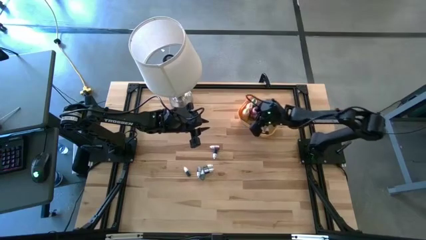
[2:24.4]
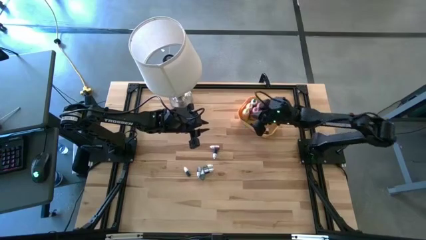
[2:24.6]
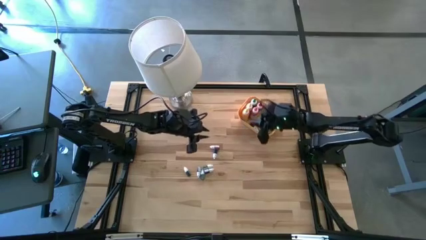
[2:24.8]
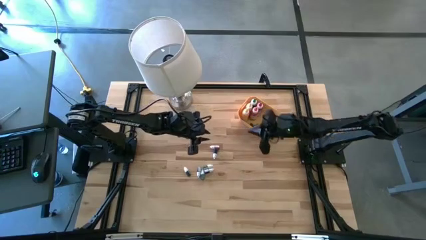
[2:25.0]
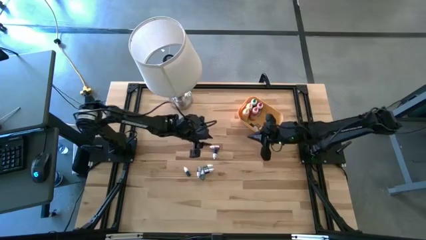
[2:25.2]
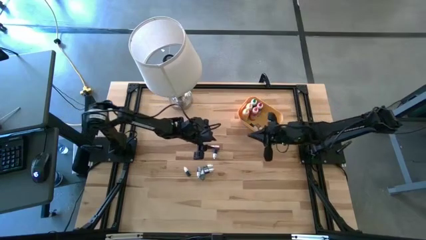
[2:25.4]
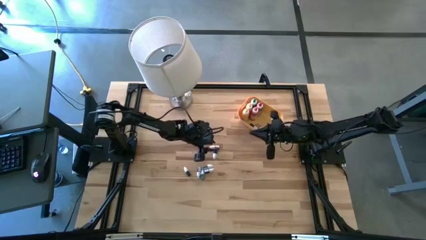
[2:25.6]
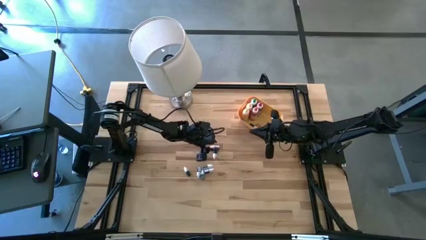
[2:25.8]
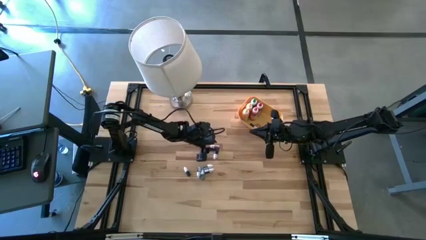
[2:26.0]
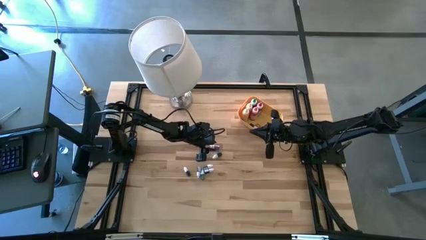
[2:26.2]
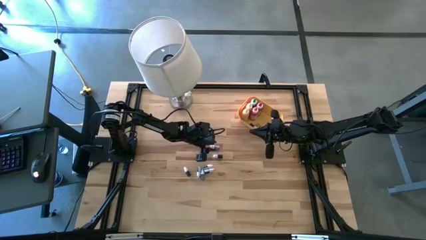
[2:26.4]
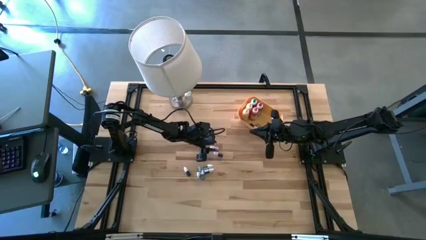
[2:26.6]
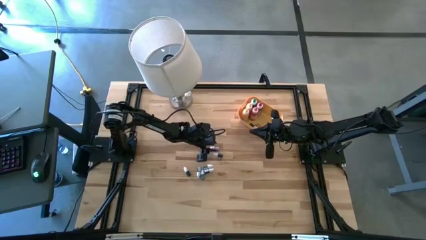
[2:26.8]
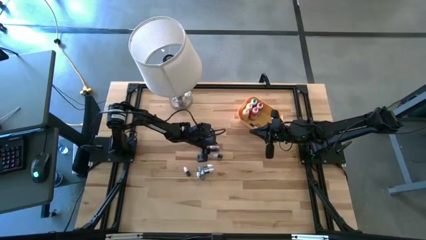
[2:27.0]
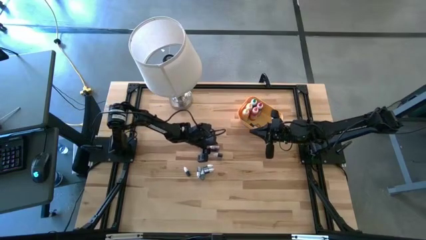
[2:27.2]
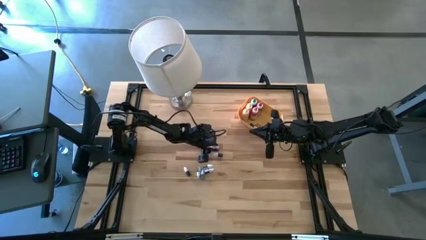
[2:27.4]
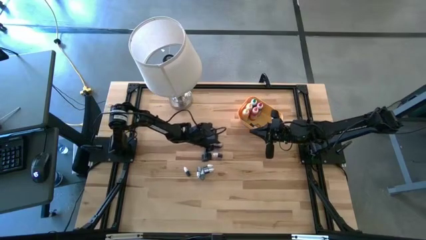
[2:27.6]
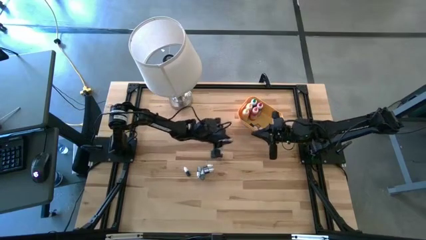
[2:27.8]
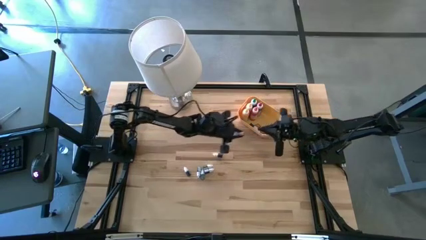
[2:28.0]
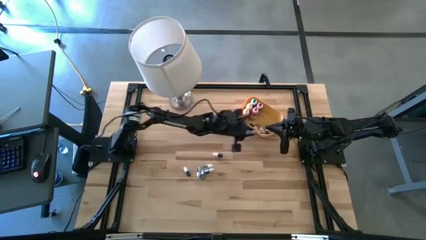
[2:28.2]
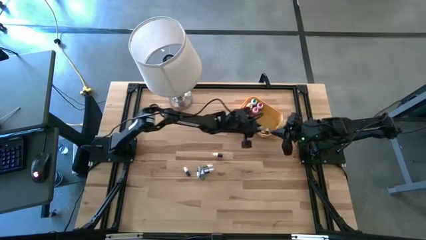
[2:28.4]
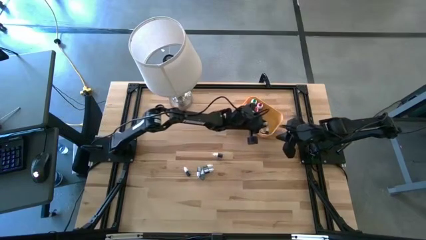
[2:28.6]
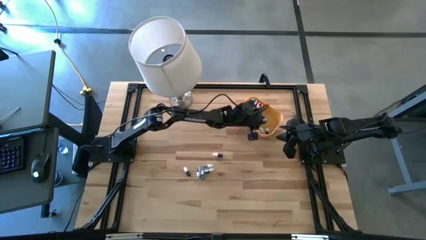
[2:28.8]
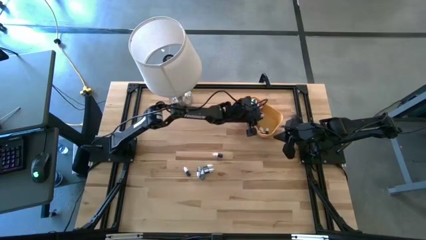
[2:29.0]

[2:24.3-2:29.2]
Task: Pick & Place food coloring
Put the small red food coloring bottle into the yellow bin

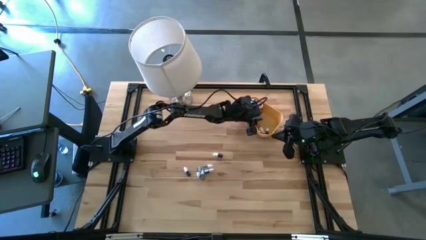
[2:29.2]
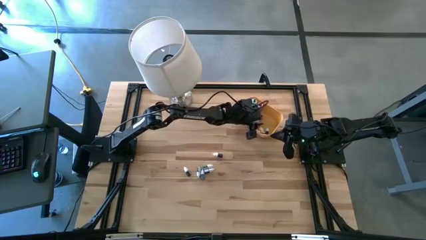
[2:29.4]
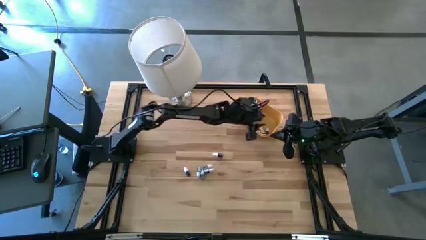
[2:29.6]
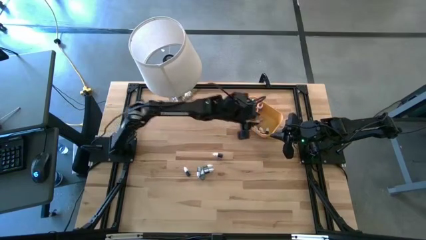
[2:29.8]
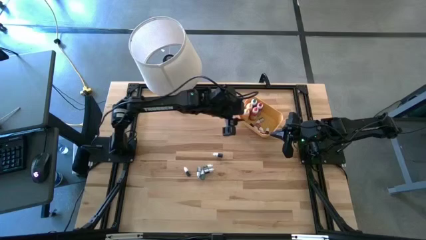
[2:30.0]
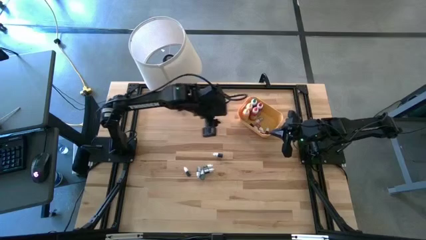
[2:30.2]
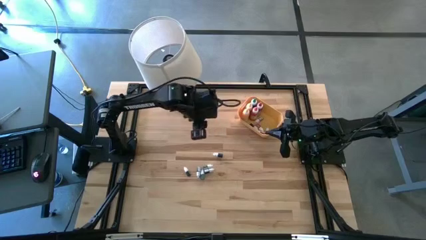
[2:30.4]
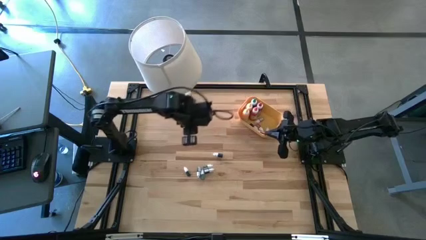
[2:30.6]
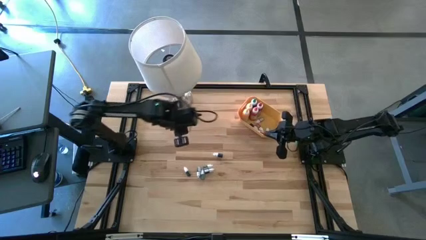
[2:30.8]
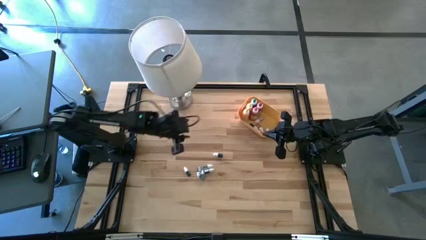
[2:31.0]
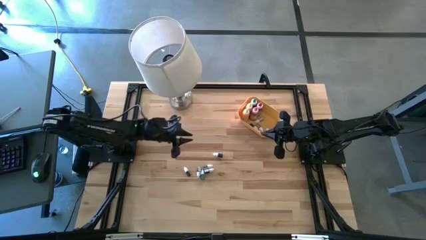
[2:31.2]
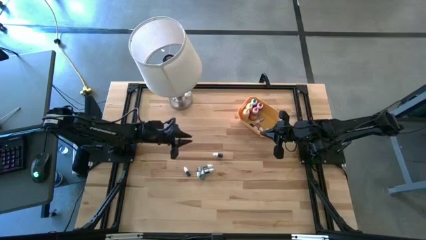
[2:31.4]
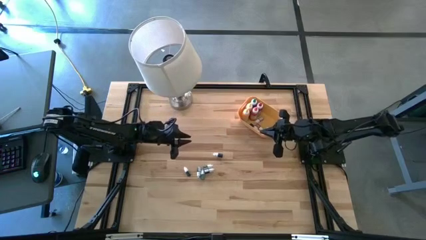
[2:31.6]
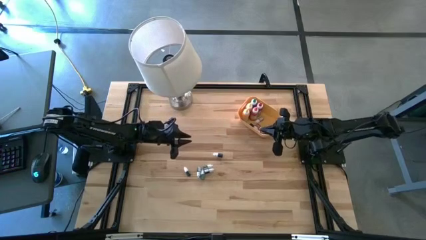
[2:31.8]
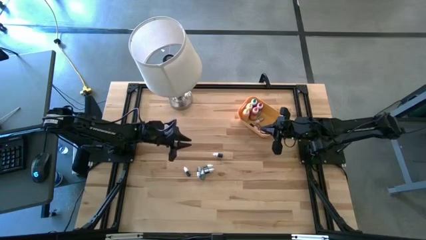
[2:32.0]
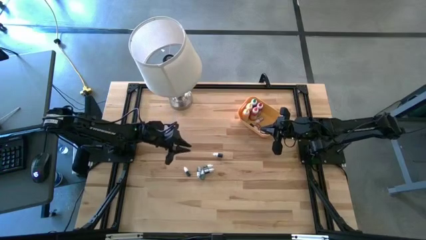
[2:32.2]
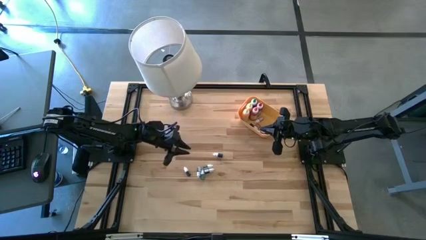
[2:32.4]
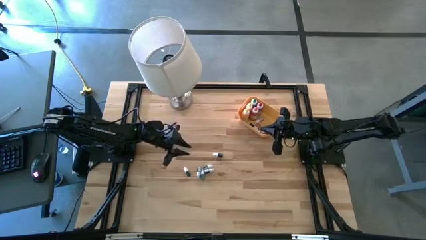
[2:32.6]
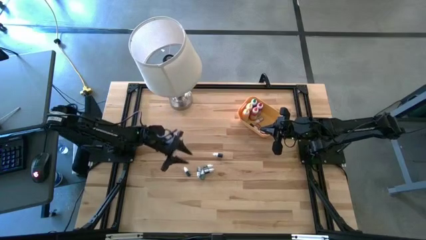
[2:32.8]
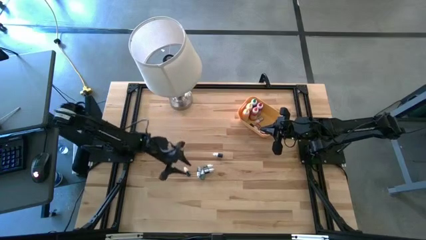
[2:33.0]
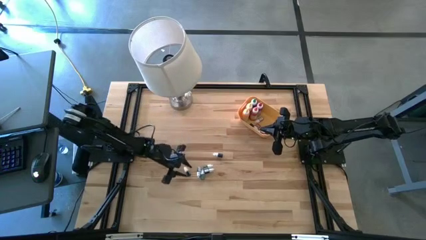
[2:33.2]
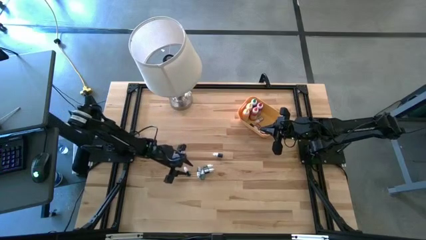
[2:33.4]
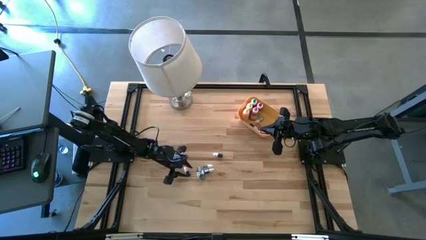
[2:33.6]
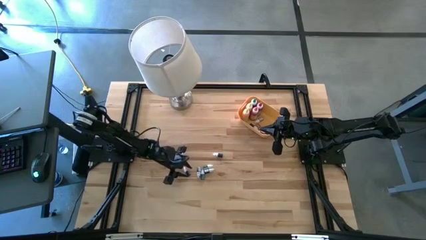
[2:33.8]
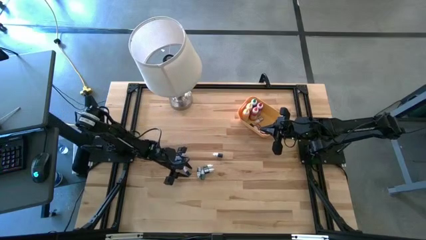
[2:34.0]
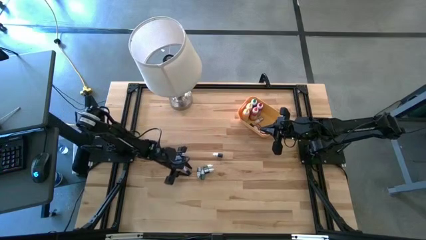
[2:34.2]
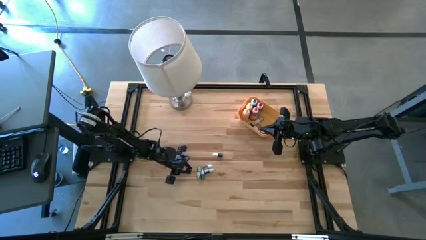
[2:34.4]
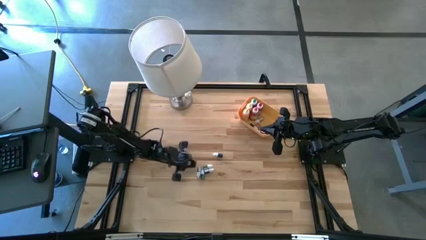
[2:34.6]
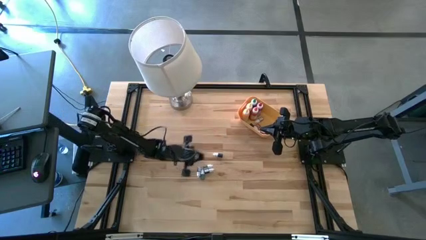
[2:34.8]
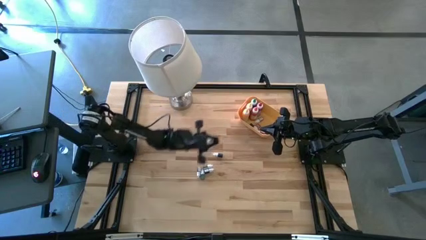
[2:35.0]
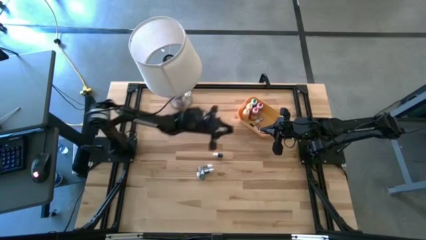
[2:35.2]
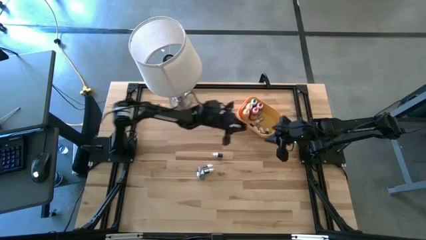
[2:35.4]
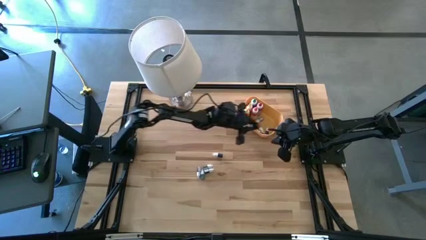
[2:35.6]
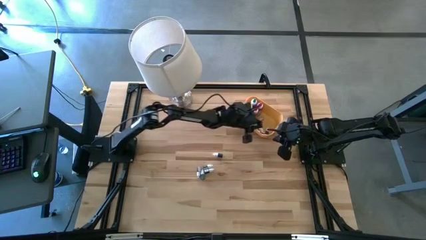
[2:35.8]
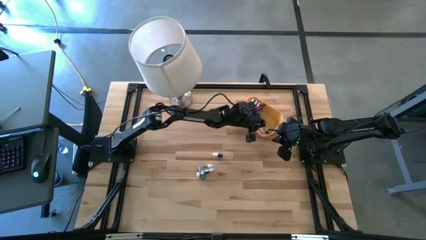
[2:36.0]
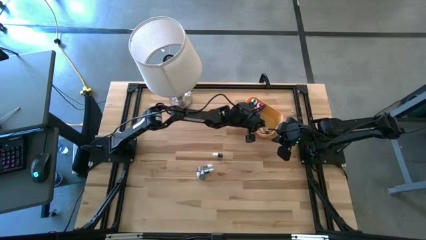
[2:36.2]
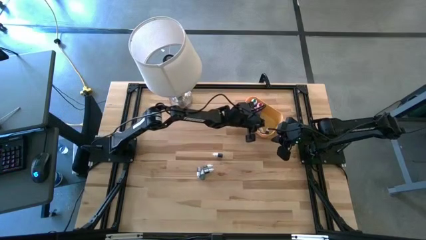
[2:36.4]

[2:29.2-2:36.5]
Put the small green food coloring bottle into the yellow bin

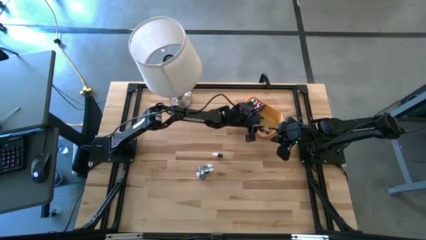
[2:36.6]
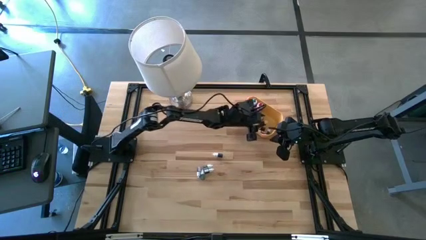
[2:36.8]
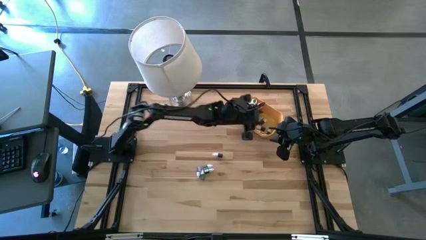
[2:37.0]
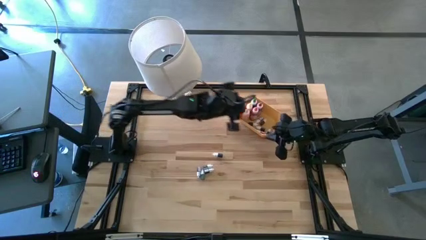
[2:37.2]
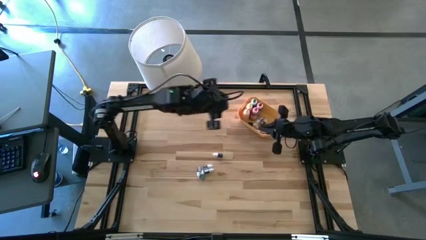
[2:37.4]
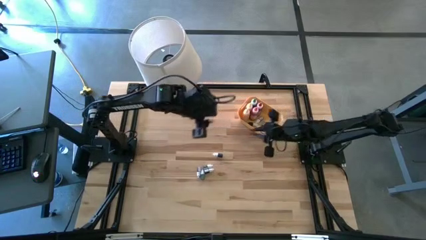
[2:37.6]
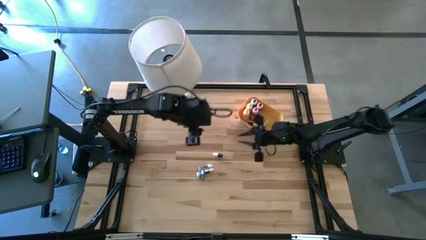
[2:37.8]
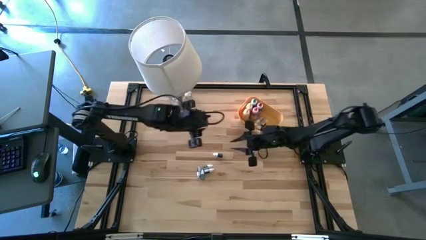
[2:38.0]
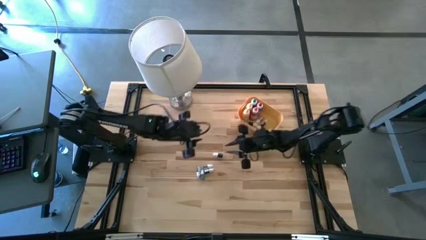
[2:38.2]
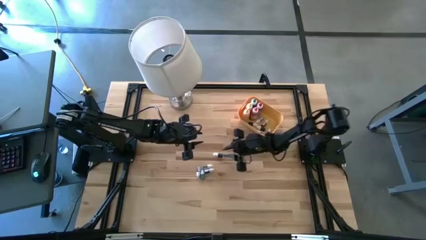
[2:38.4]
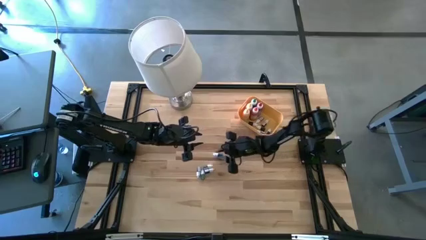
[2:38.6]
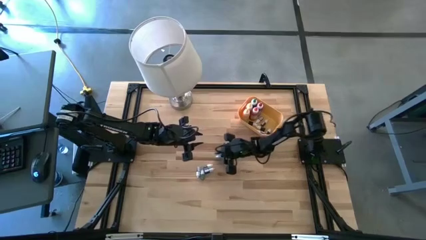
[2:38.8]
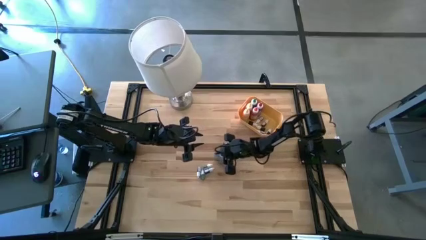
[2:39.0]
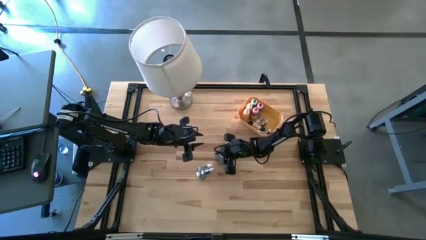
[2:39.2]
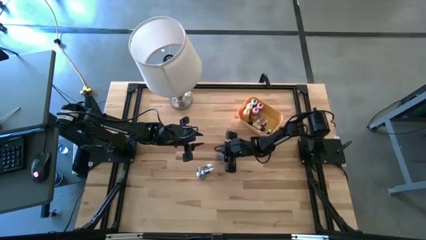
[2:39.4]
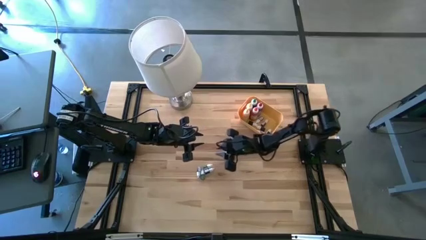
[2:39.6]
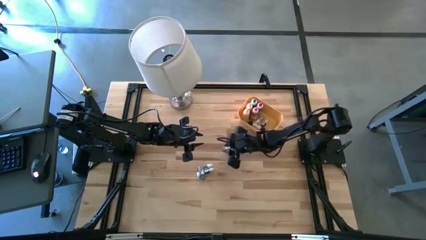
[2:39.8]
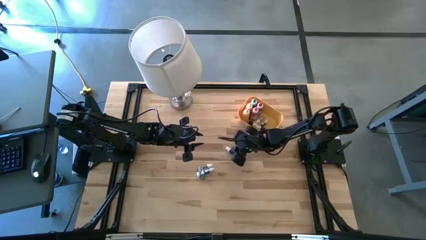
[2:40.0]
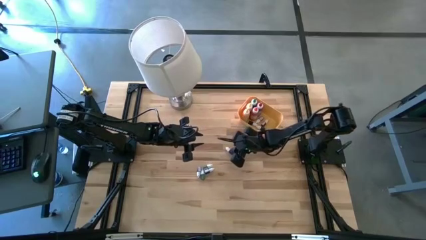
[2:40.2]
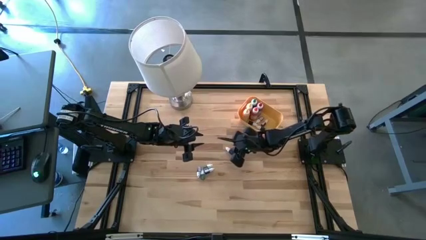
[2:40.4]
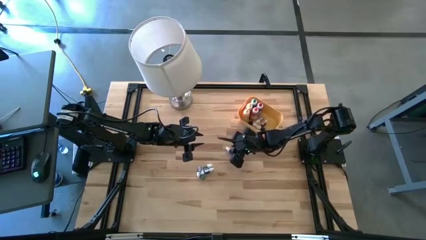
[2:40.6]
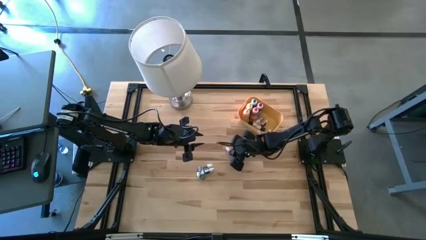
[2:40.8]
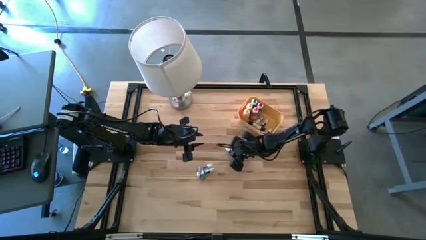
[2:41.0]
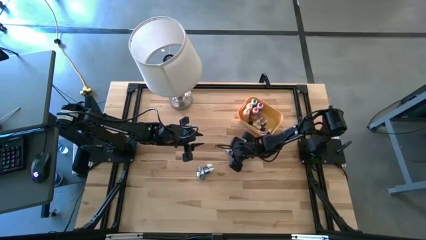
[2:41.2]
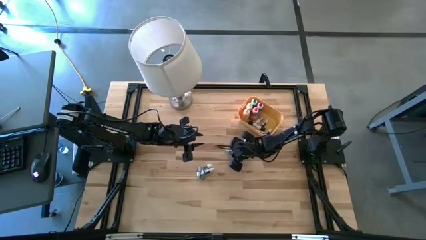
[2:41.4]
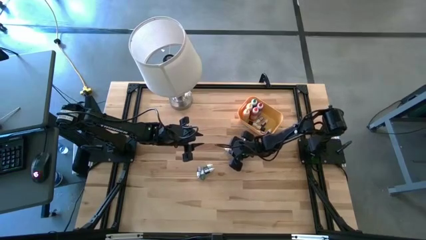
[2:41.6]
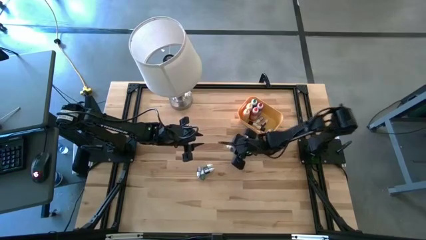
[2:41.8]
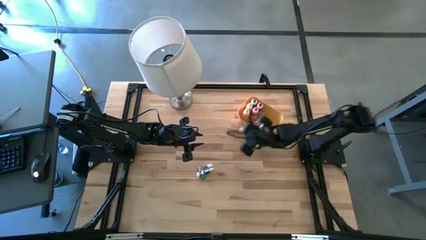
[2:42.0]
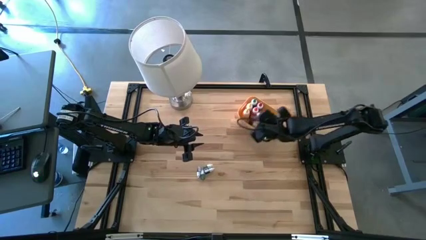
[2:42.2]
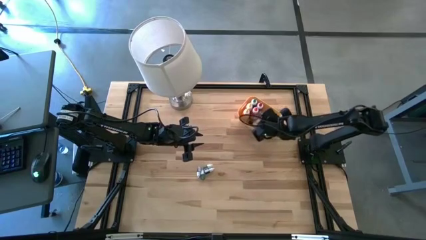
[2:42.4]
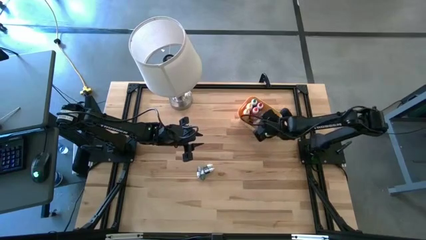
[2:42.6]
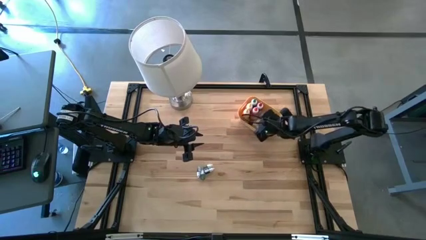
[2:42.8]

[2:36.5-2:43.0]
Put the dark small blue food coloring bottle into the yellow bin
